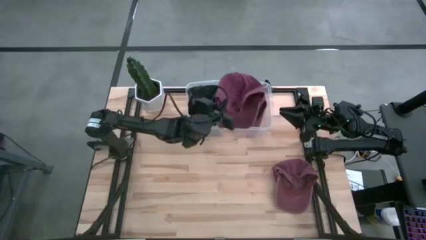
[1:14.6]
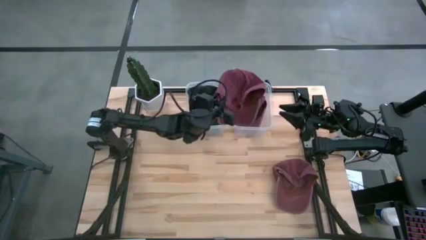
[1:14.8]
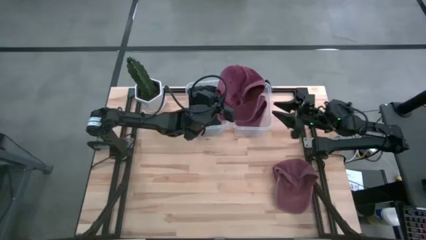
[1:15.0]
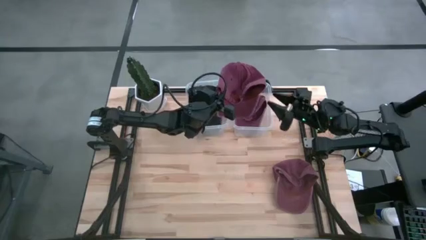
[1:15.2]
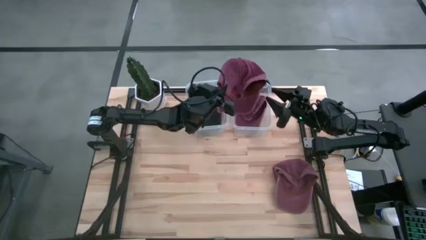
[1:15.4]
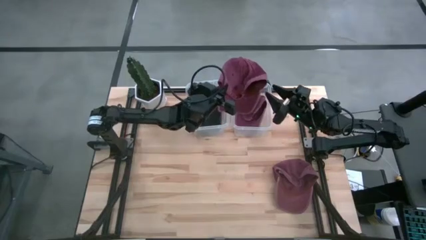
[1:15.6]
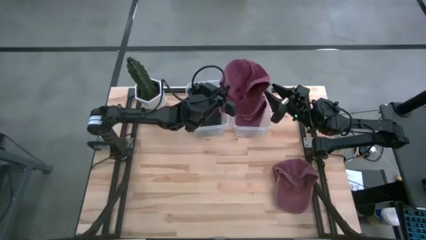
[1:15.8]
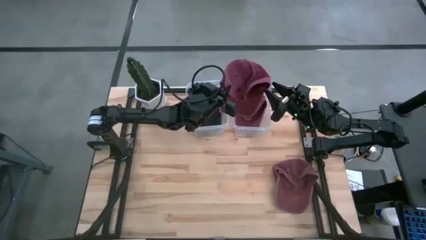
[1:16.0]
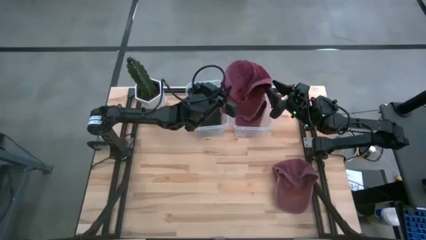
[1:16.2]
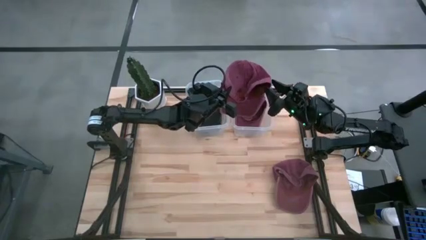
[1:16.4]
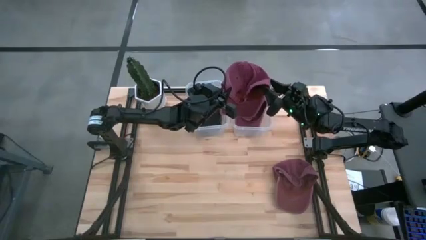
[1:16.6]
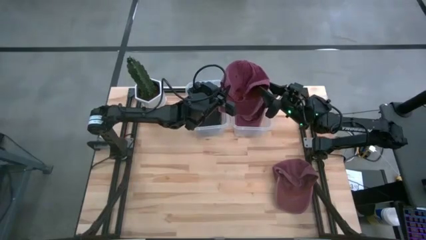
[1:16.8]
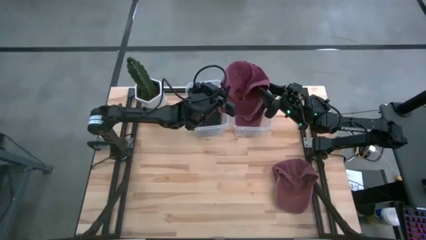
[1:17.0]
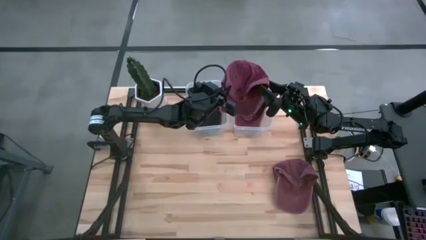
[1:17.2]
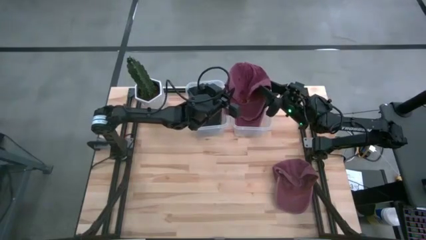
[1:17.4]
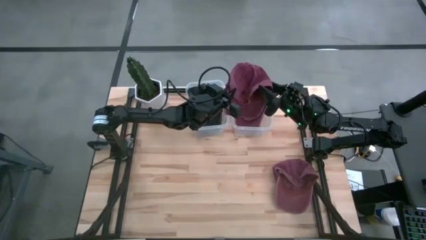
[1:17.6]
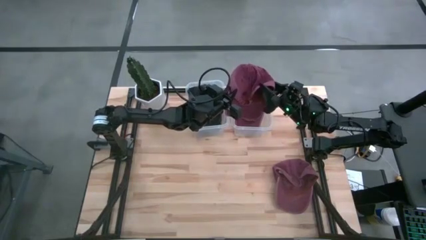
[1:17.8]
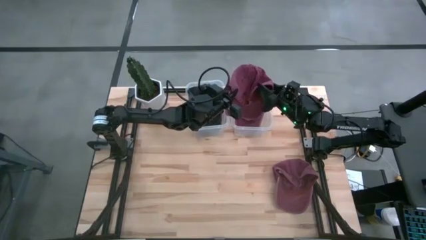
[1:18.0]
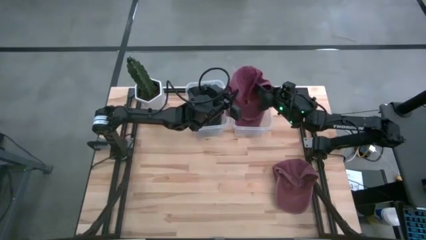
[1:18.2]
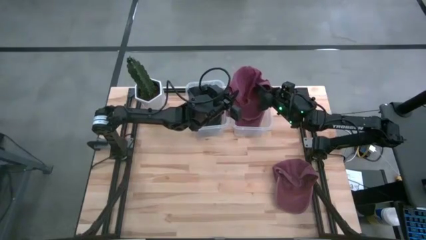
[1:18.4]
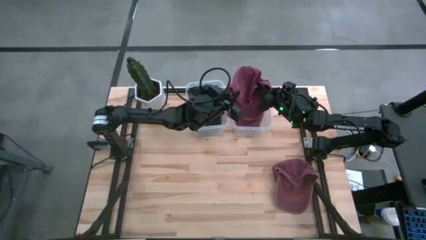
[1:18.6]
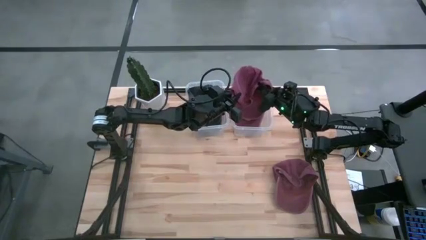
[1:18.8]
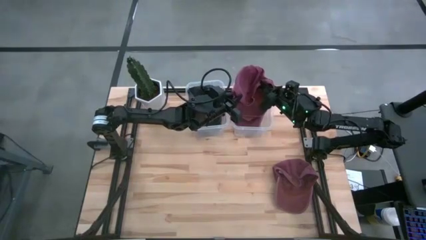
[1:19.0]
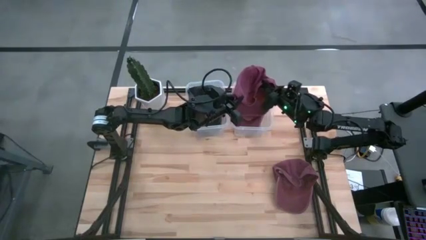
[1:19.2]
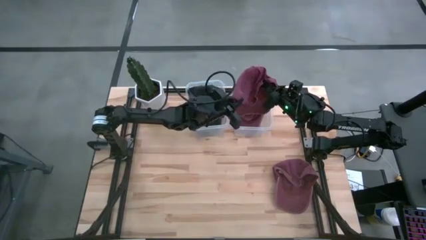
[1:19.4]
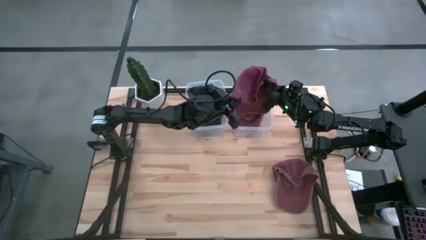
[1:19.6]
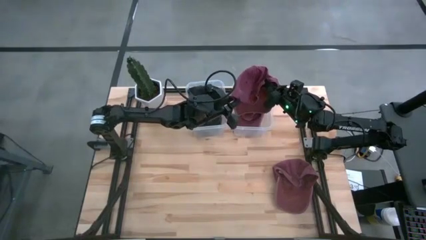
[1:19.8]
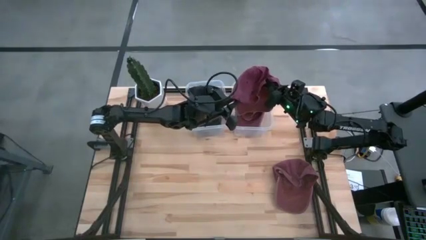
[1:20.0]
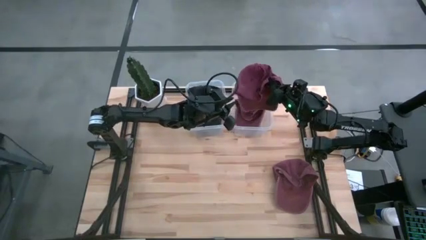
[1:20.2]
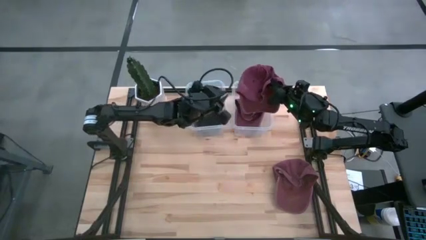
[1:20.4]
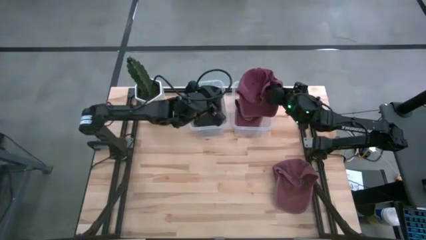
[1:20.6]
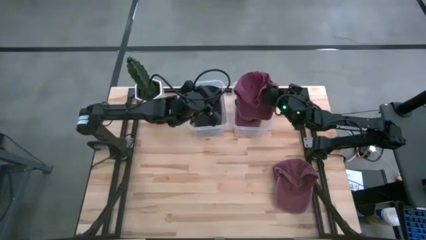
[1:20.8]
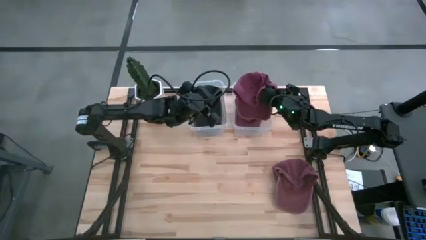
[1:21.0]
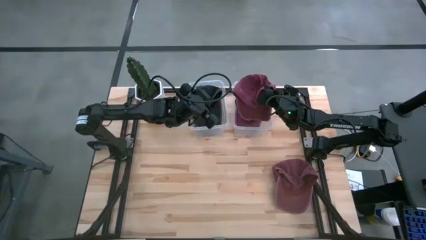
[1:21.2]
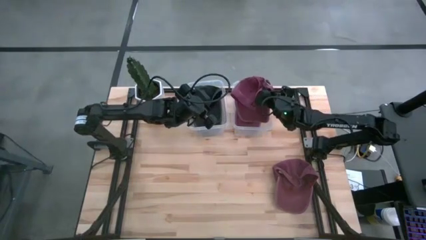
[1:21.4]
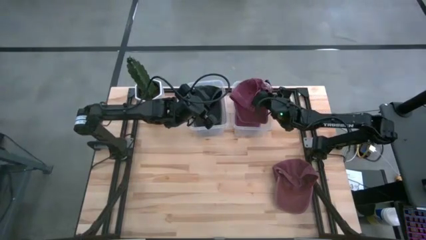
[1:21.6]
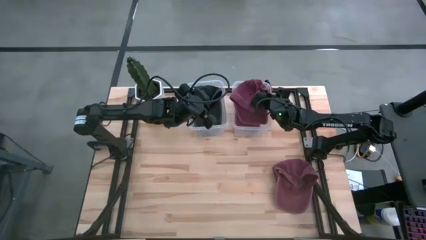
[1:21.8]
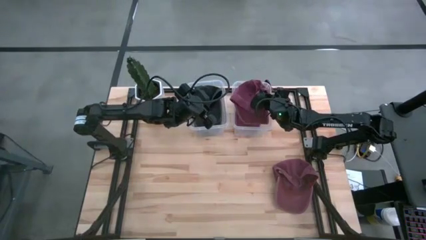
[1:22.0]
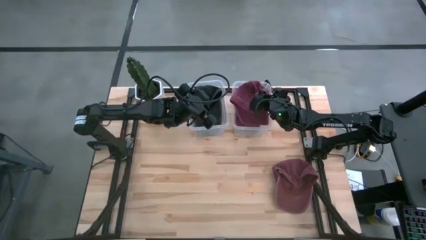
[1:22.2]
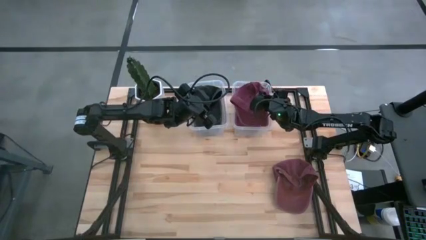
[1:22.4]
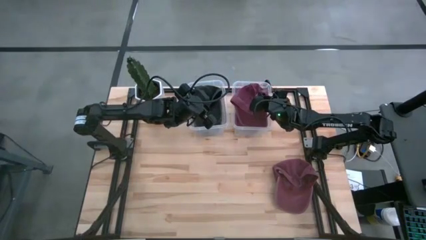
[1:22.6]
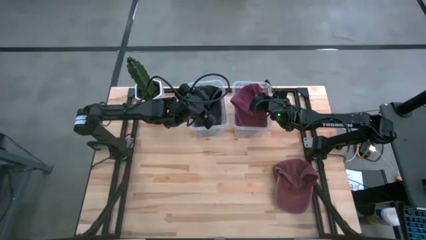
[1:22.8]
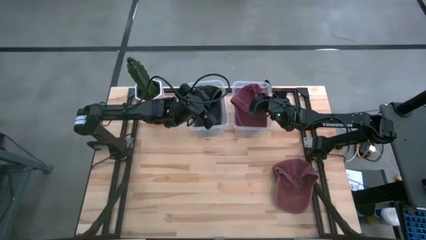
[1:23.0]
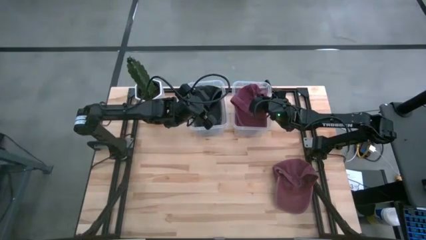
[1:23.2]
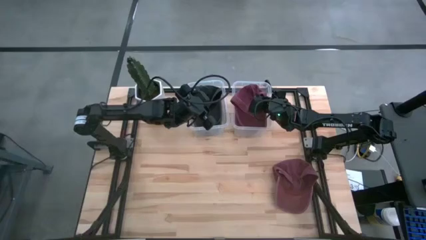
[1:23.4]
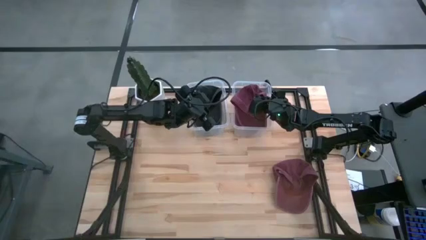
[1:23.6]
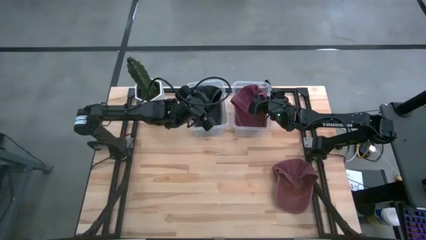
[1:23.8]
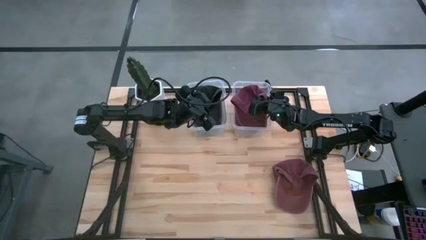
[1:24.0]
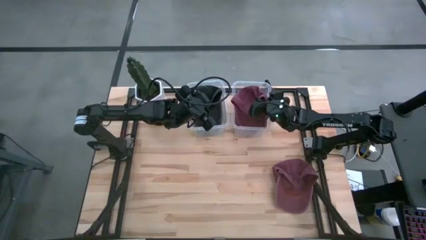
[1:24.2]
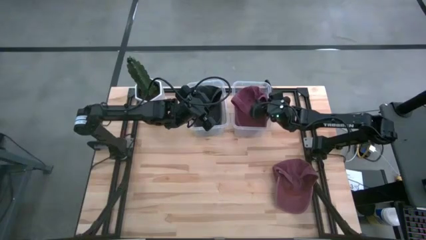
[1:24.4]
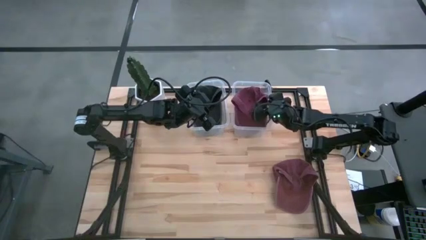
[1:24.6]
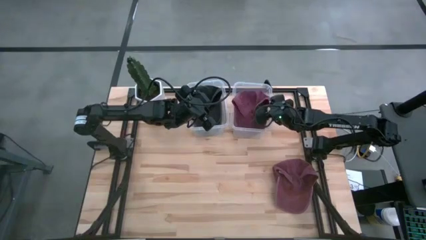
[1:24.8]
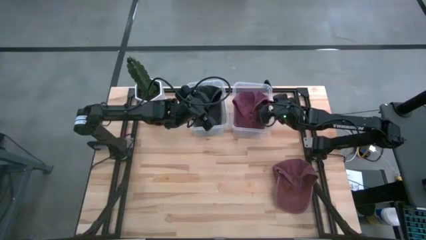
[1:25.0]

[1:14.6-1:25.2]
Task: Pick & Place hat
Put the left pink cap into the right transparent bin
